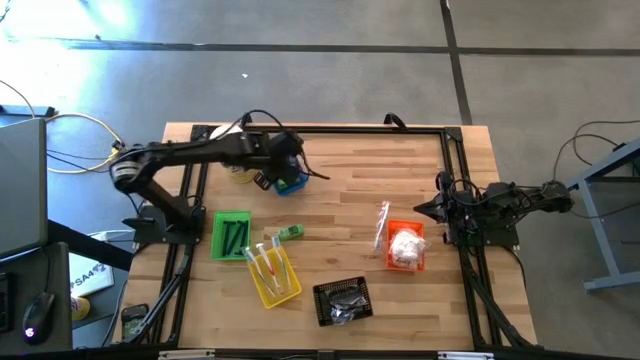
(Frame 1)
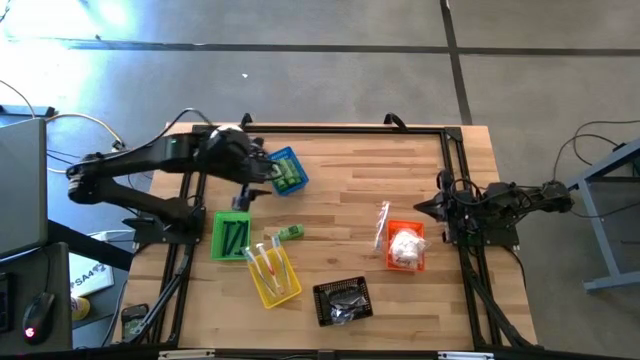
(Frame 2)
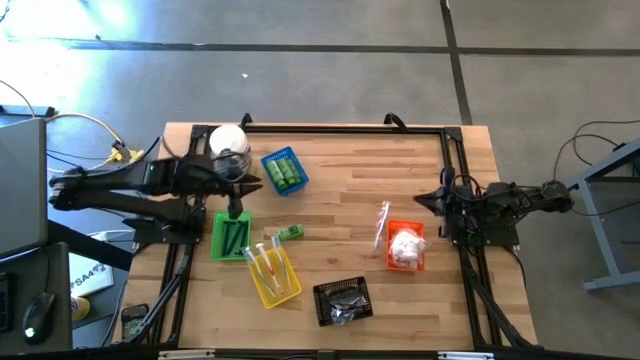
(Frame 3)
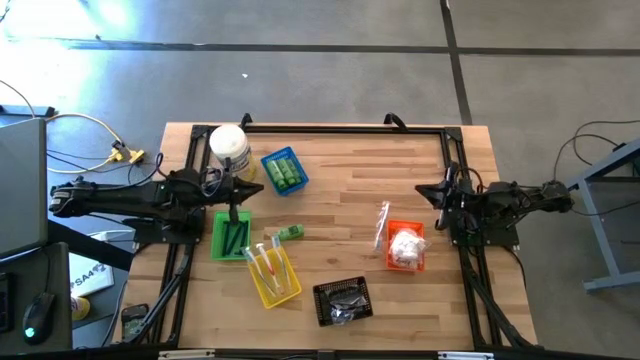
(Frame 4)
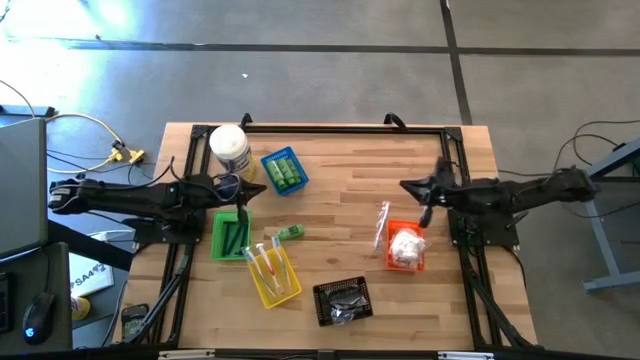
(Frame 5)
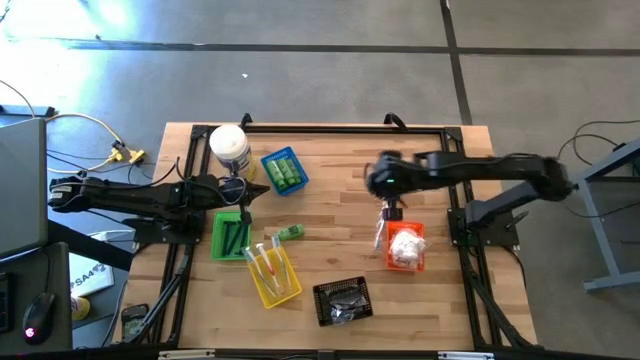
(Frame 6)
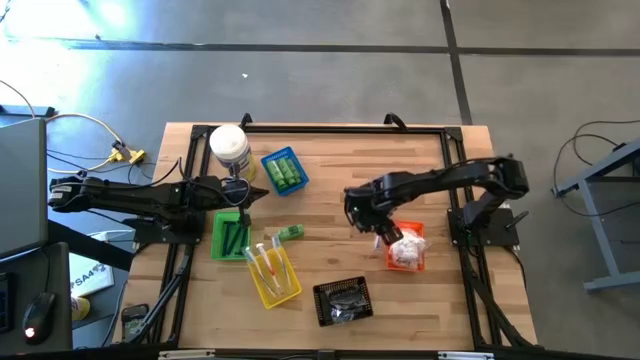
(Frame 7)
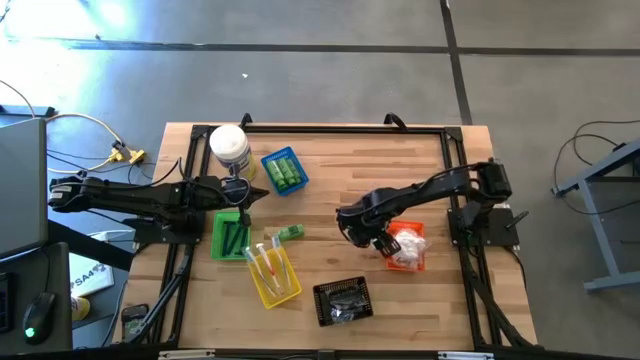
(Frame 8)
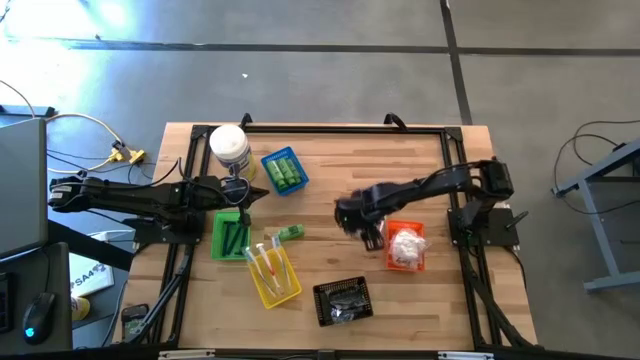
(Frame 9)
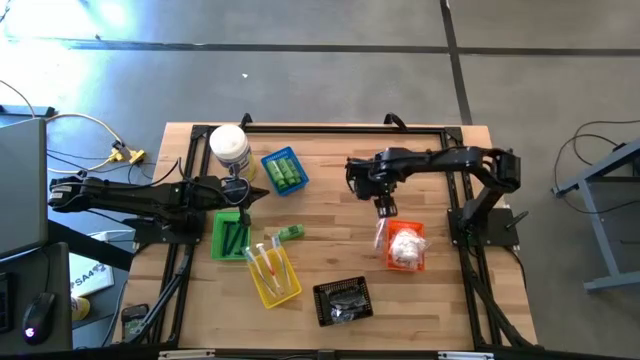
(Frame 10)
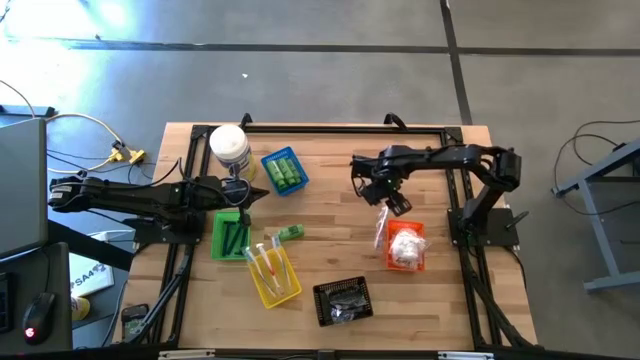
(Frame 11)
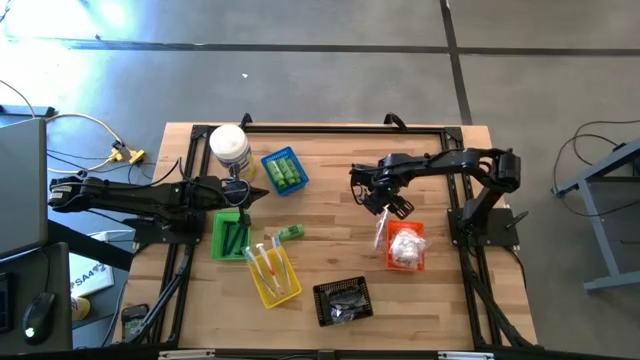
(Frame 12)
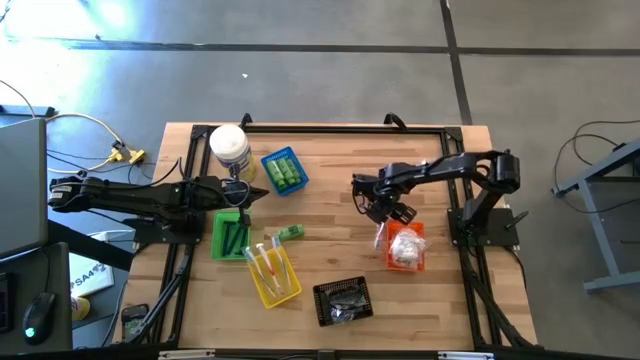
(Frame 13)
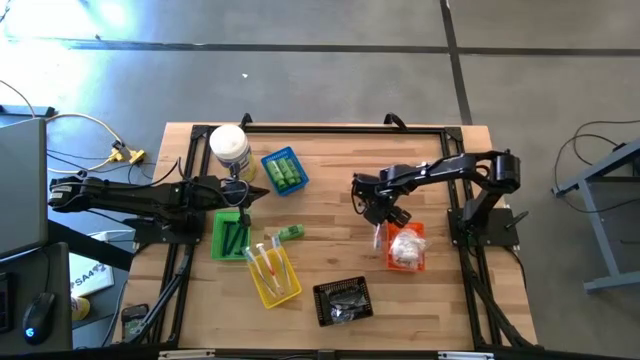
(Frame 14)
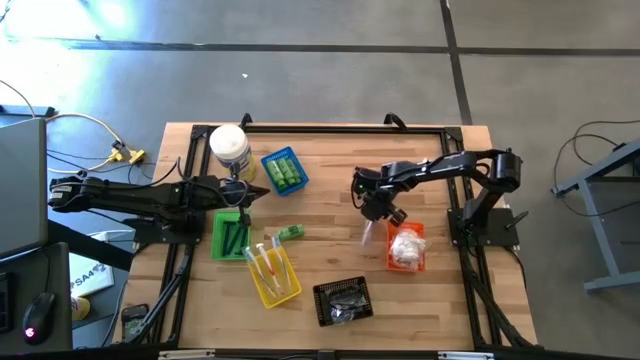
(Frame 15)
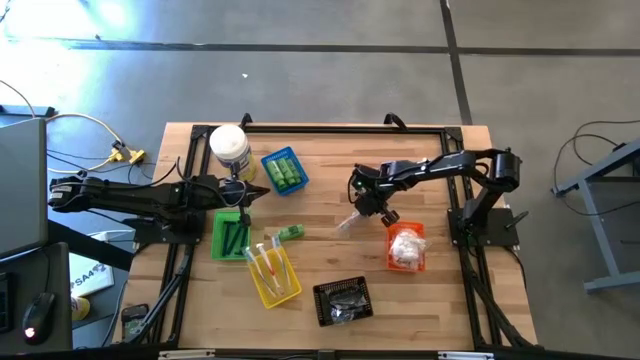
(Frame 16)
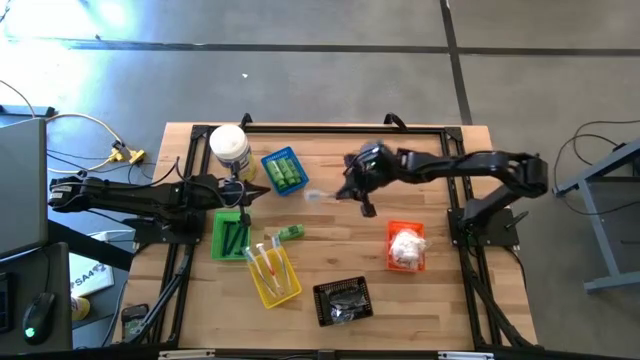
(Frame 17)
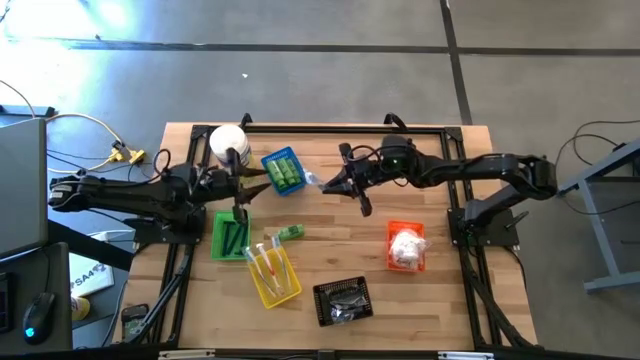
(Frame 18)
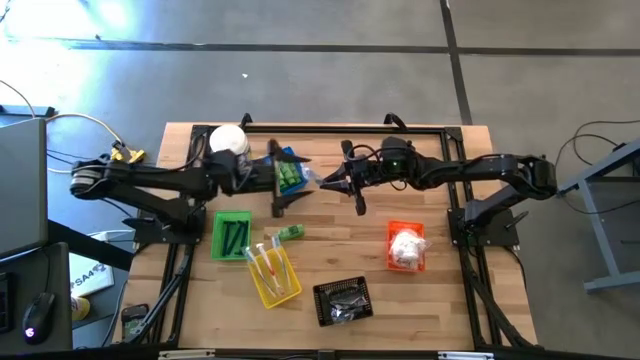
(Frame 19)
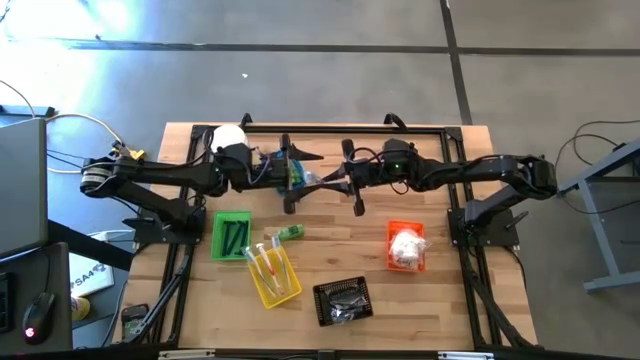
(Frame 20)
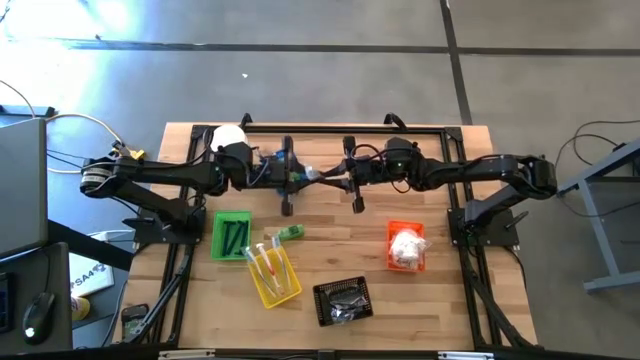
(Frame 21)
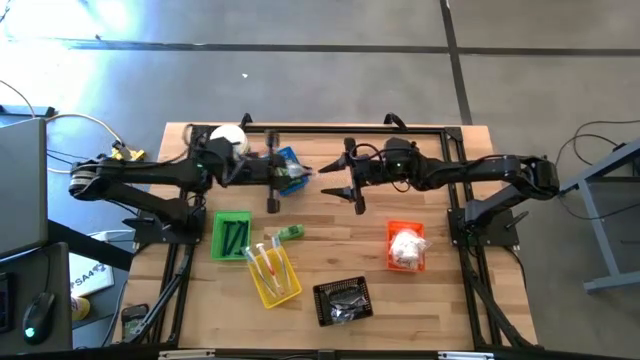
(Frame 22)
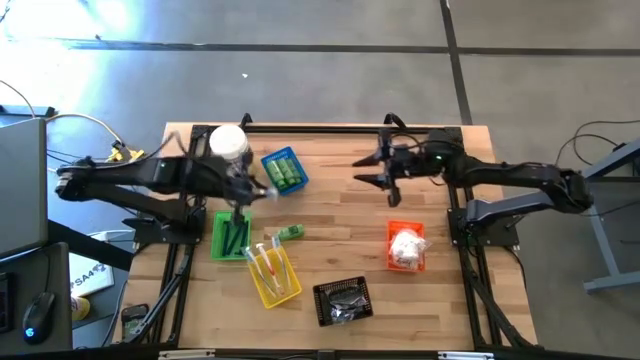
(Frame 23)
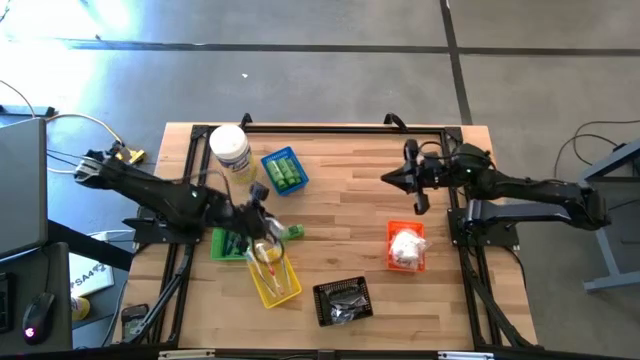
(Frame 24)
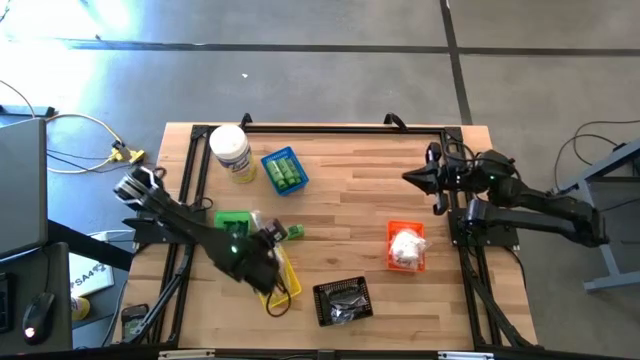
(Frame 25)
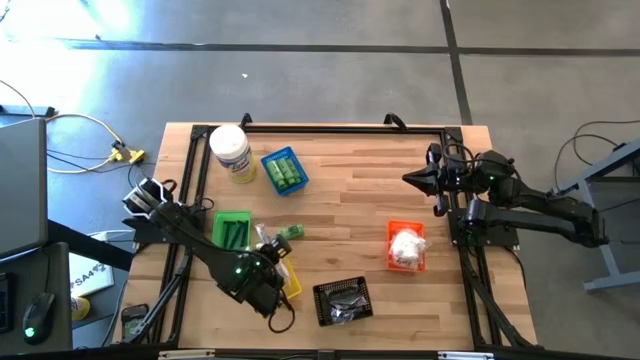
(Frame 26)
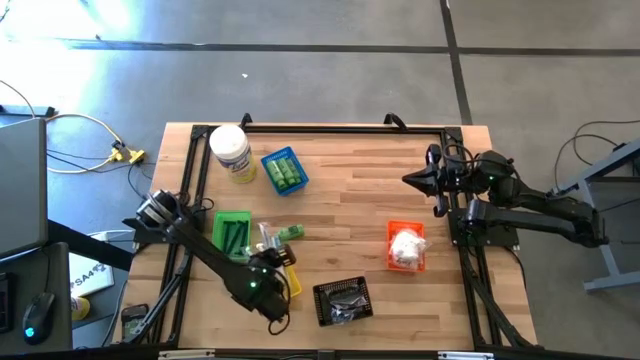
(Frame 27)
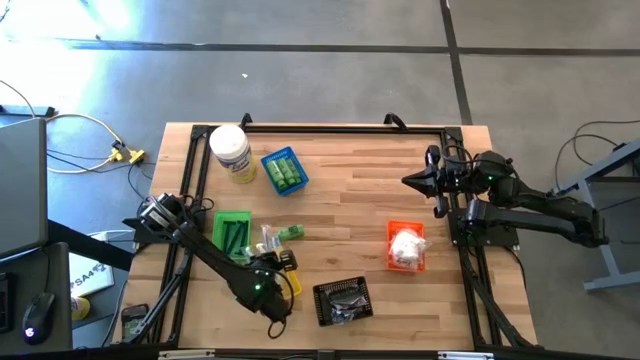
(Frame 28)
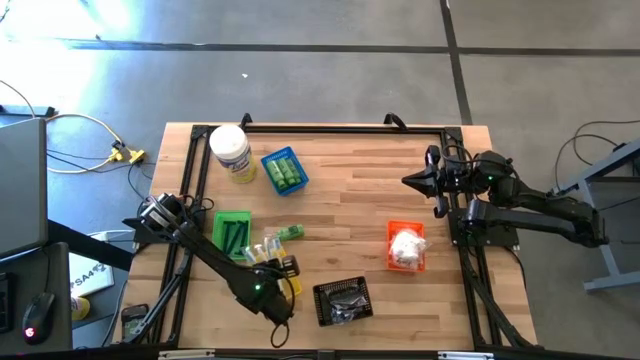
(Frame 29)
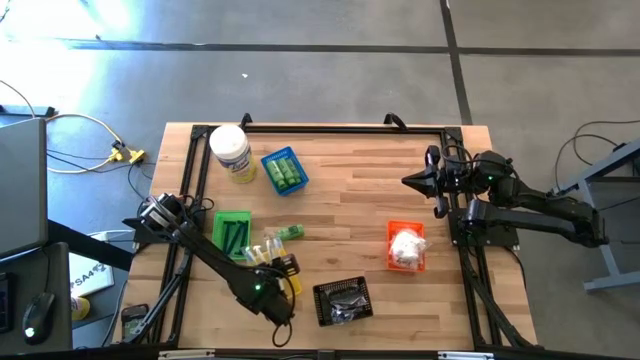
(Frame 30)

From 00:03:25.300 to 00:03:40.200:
Task: Pick & Place Travel size toiletries
Put the blue toothbrush into the yellow bin

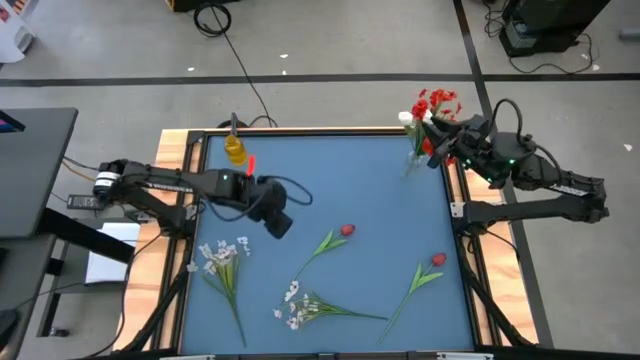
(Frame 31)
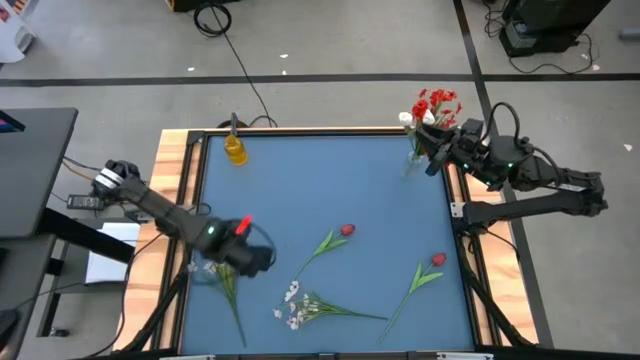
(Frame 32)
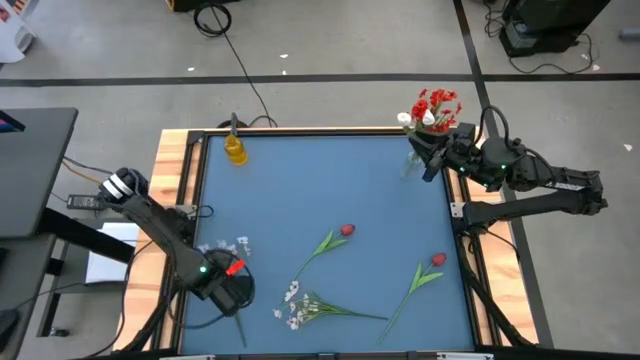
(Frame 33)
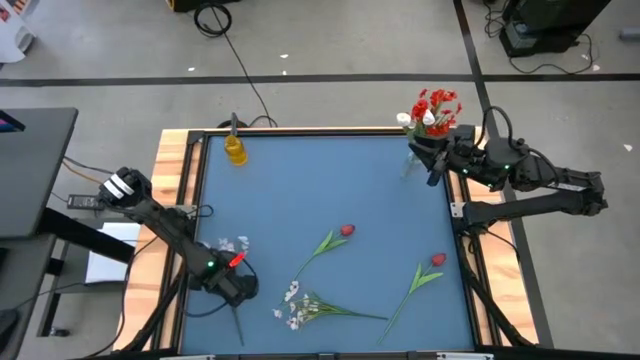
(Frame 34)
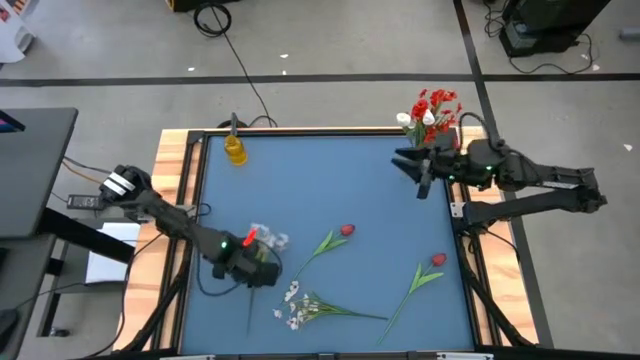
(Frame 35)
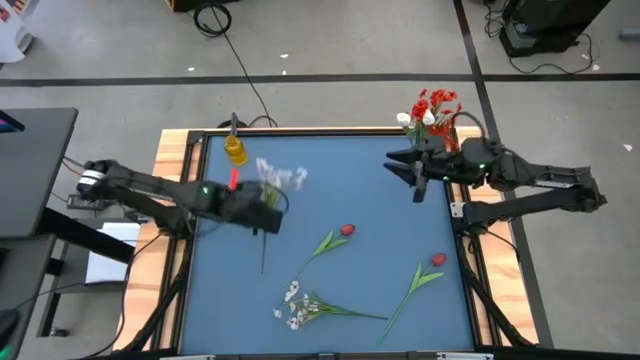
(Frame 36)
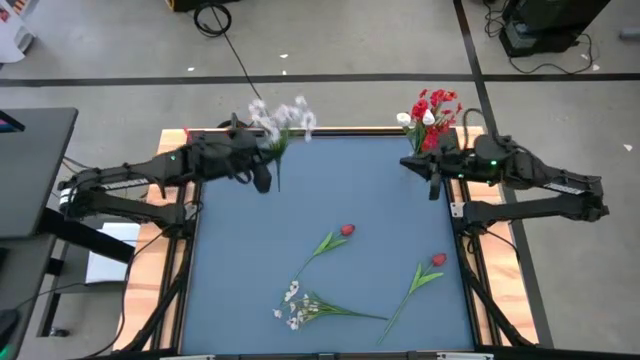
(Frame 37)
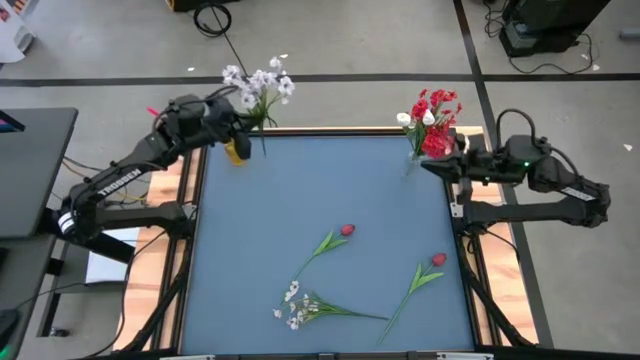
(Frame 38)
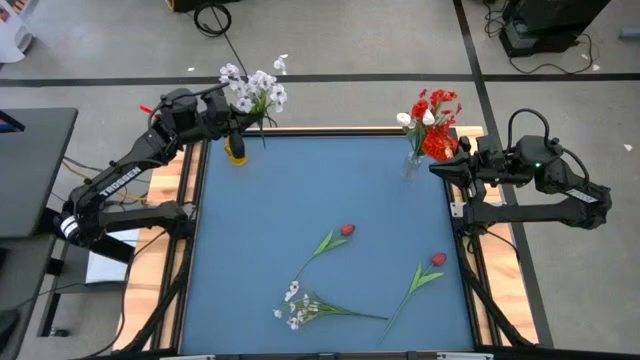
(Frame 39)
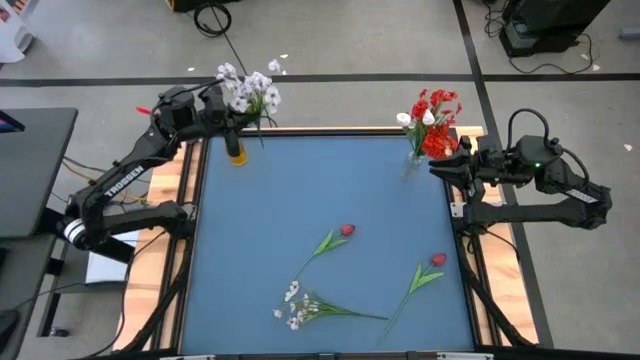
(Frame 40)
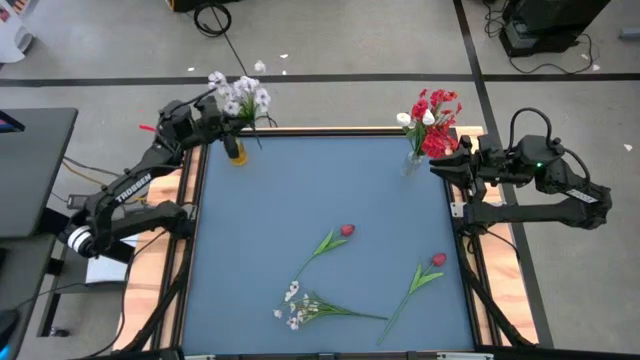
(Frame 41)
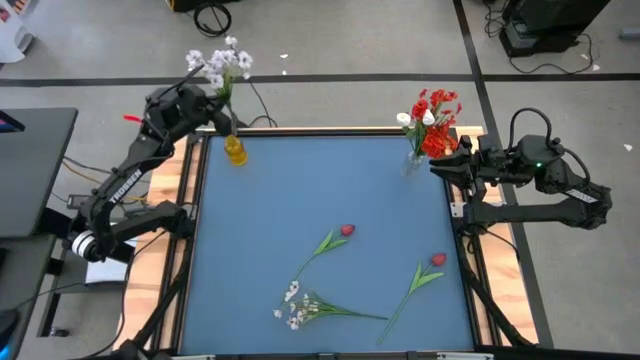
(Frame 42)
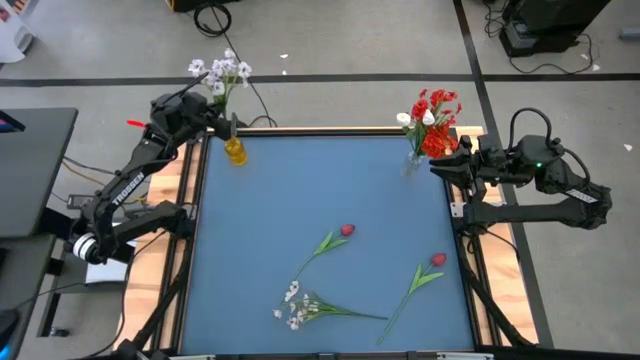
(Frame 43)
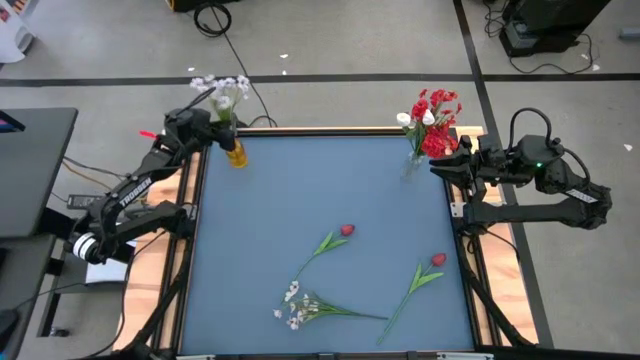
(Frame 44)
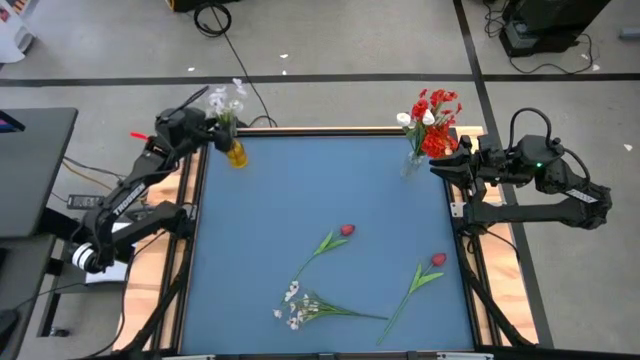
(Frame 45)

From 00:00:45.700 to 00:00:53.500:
Task: Sort flowers into vase by color
Put the left white flowers into the yellow vase
